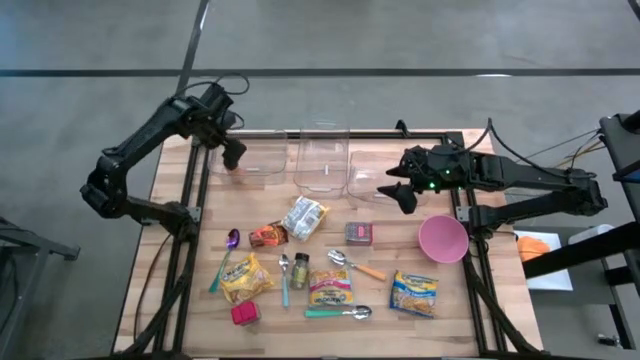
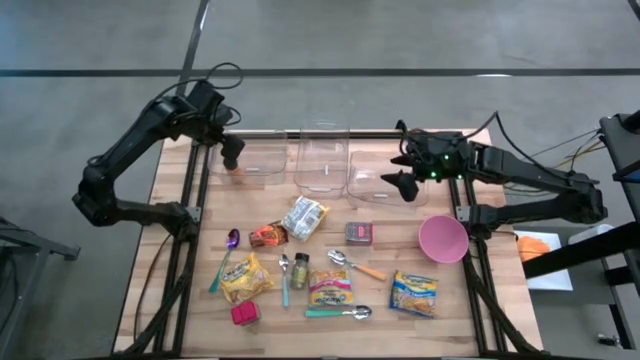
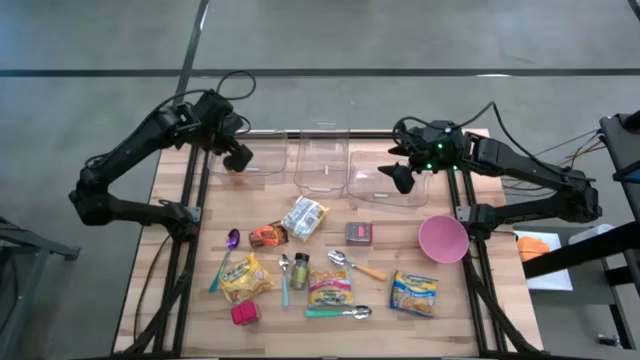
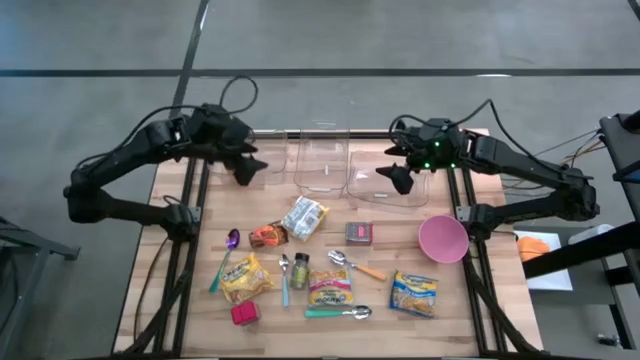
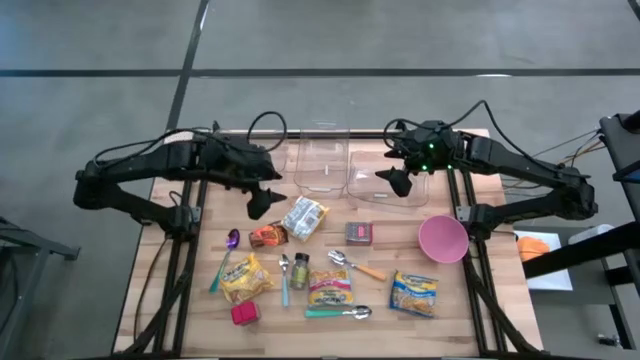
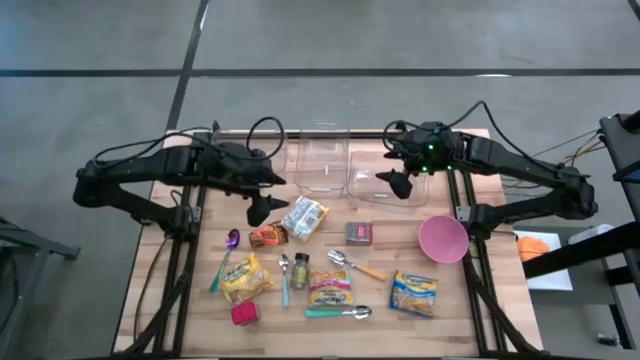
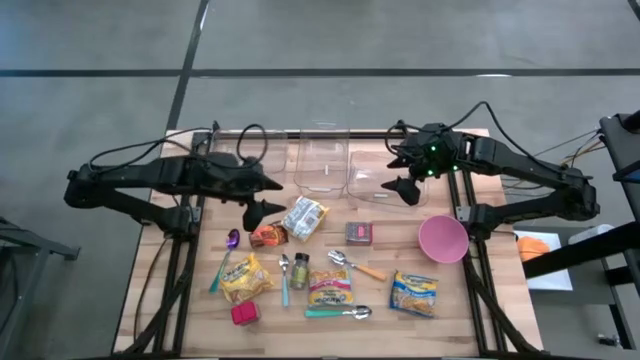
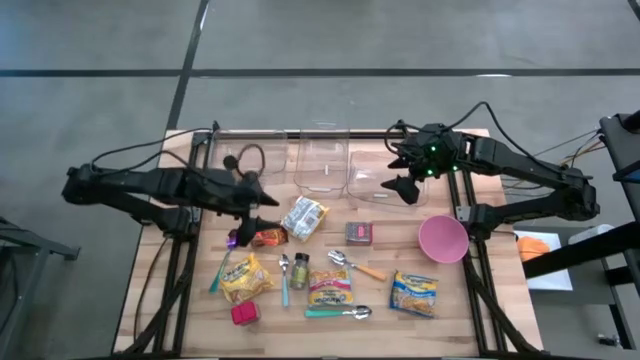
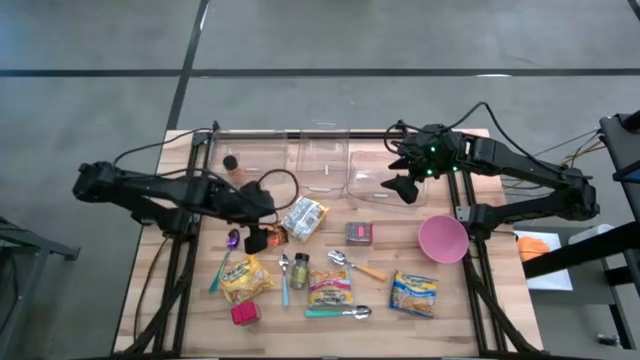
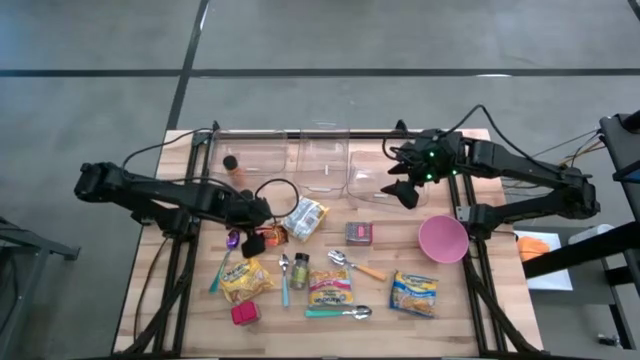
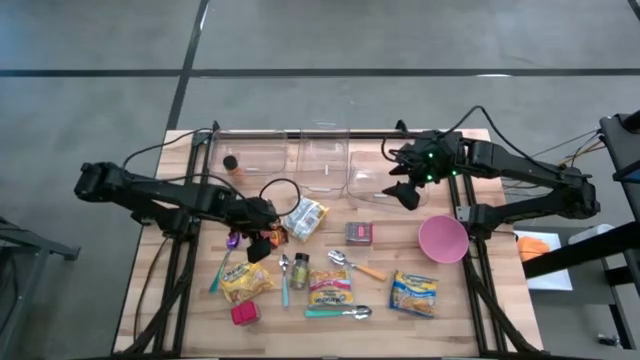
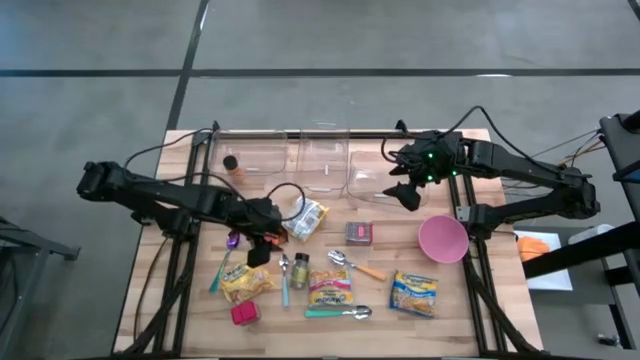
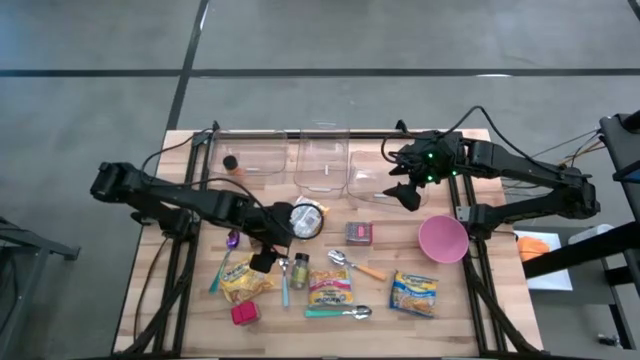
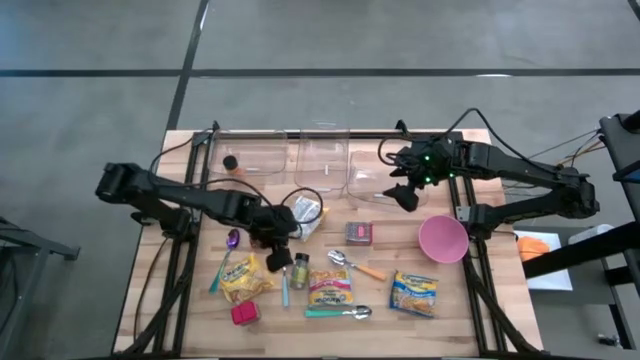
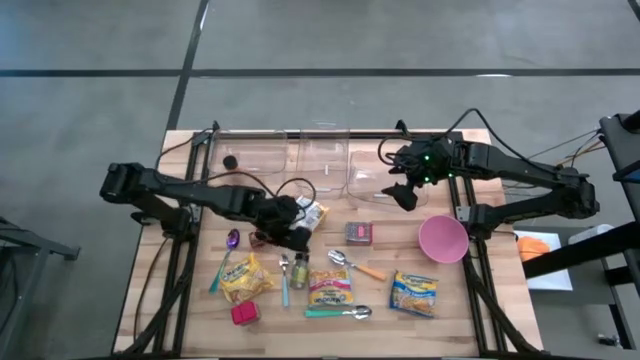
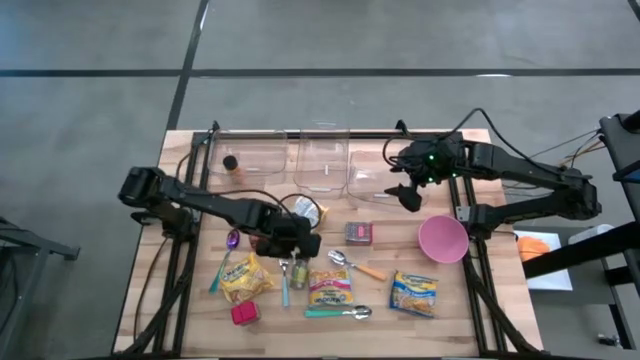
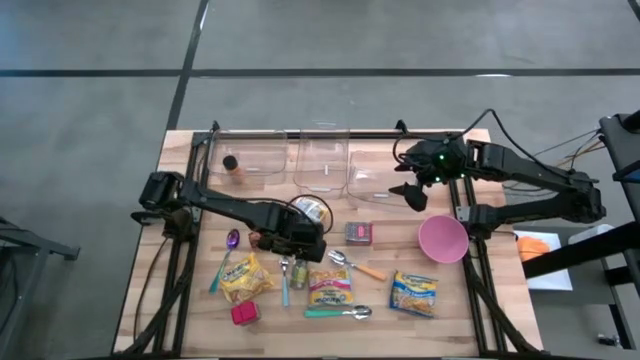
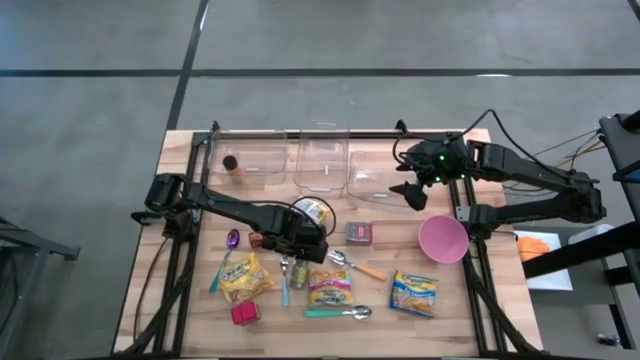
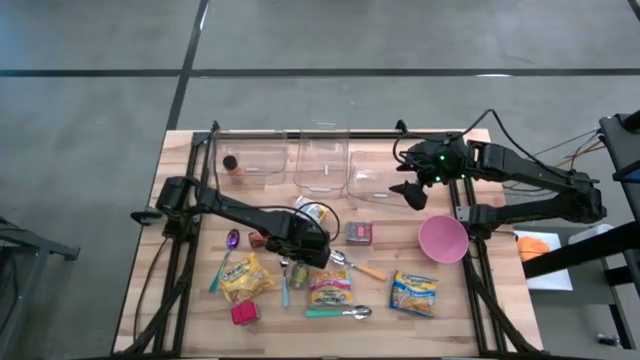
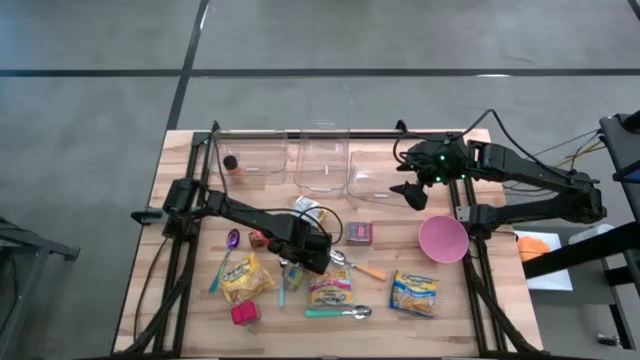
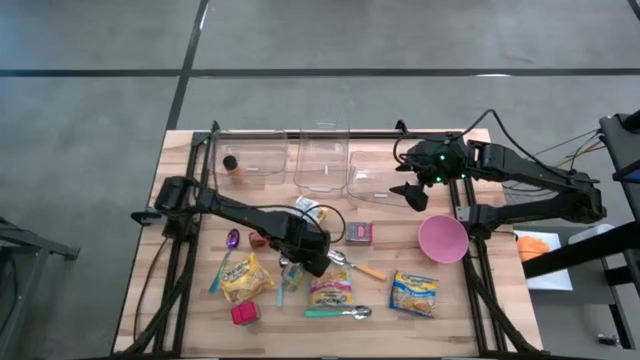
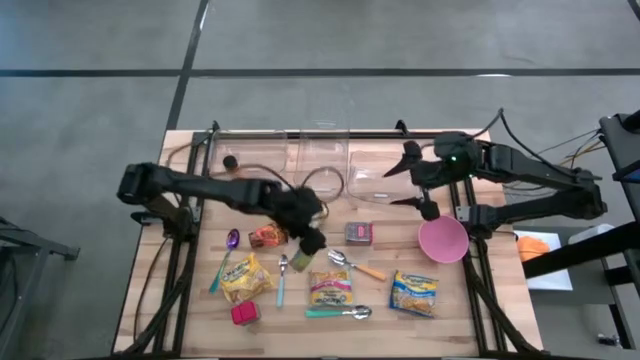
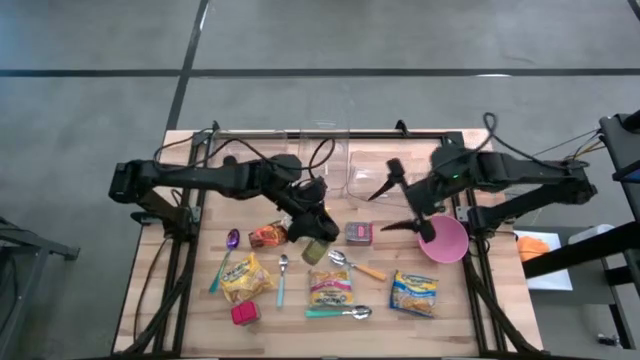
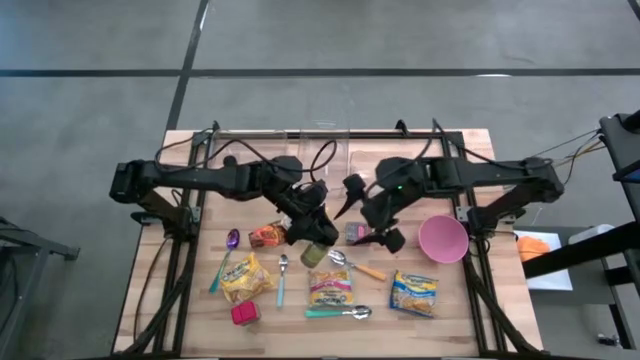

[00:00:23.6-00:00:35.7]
Put the black seasoning bottle into the left transparent bin

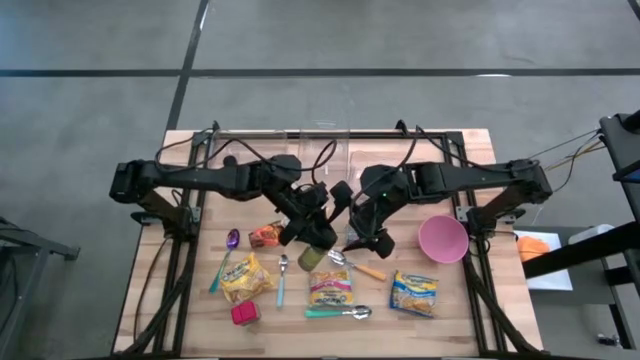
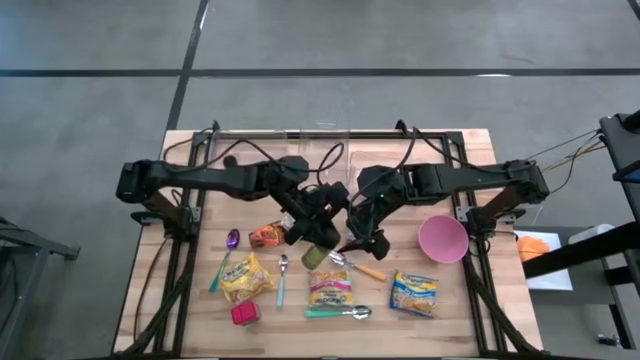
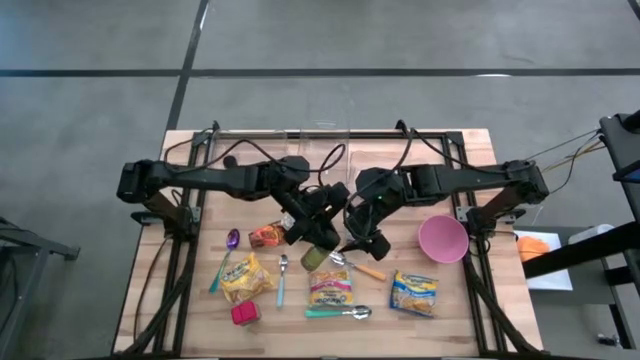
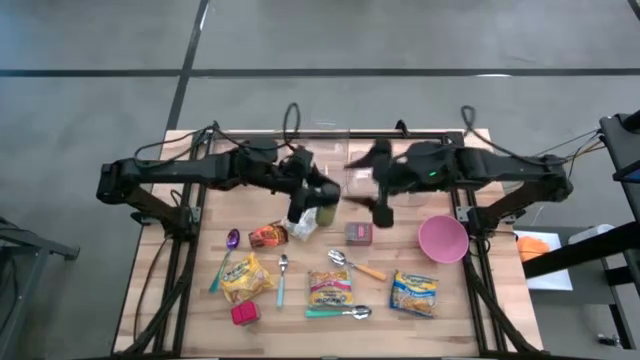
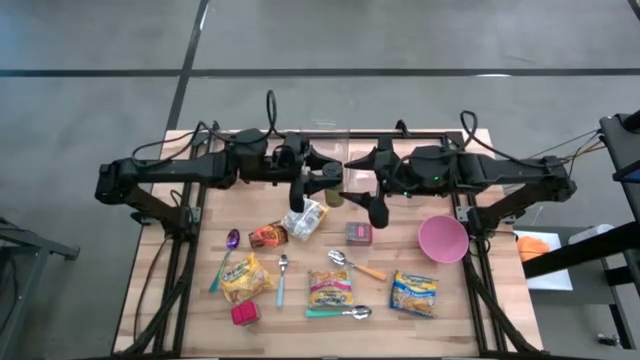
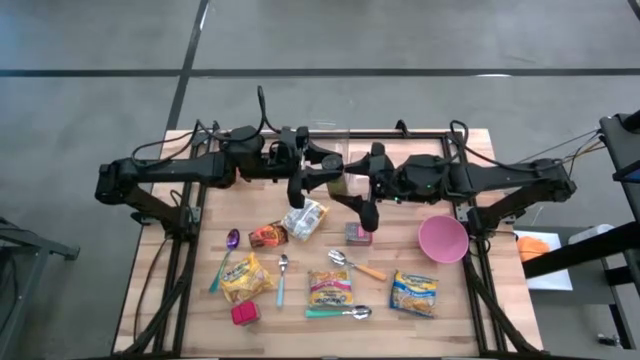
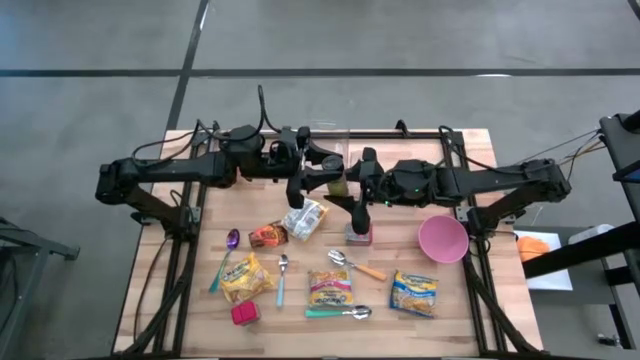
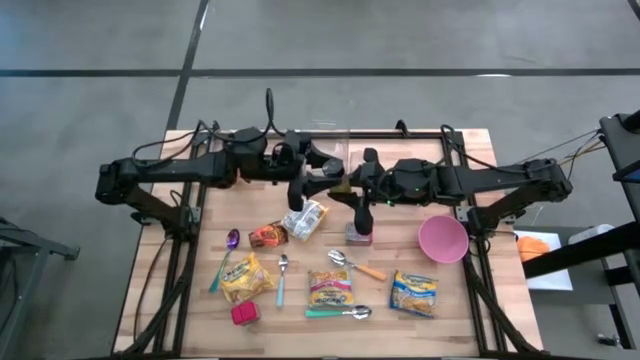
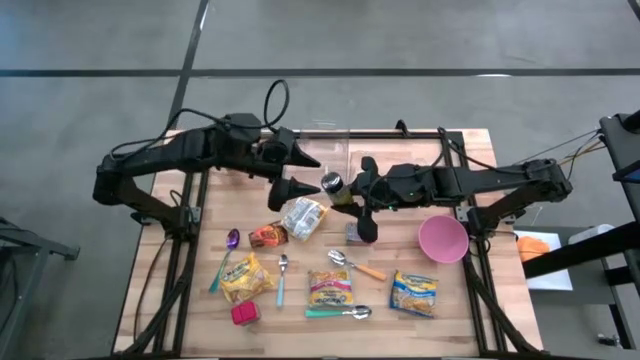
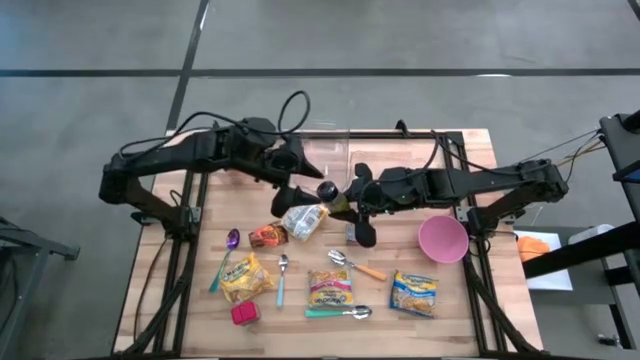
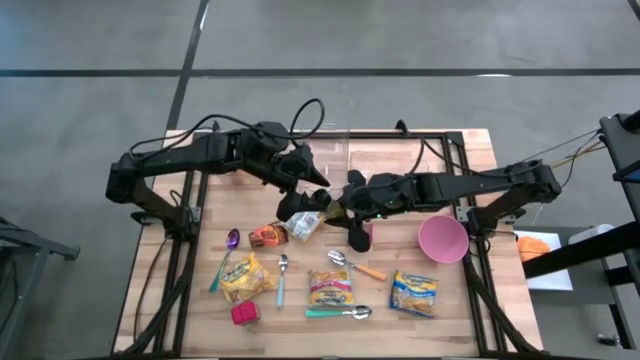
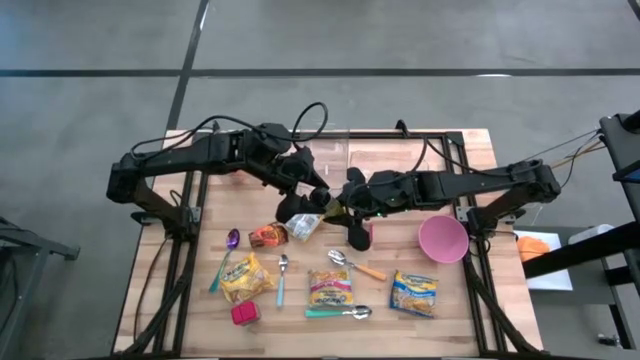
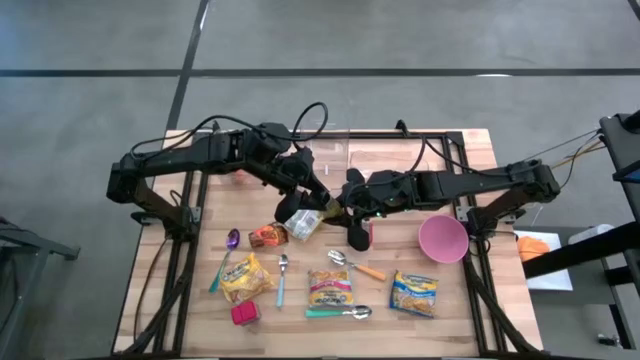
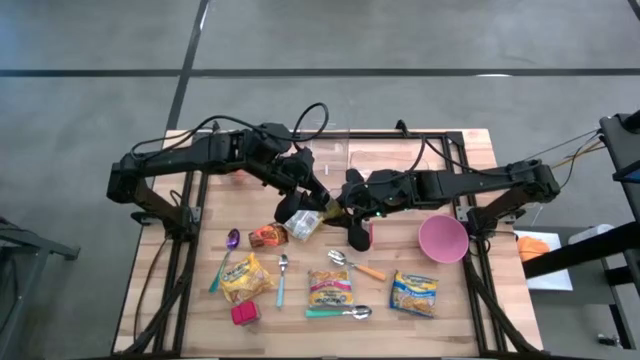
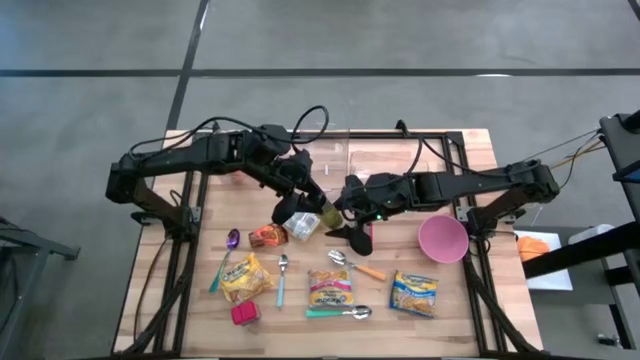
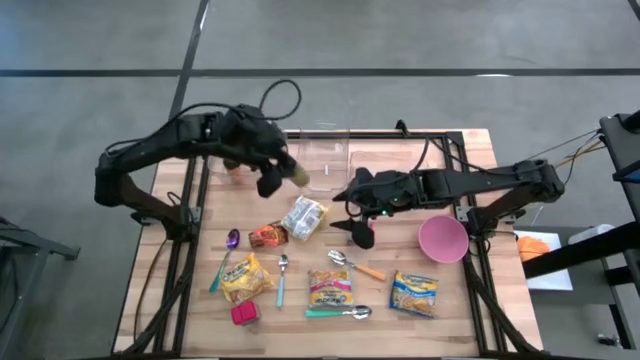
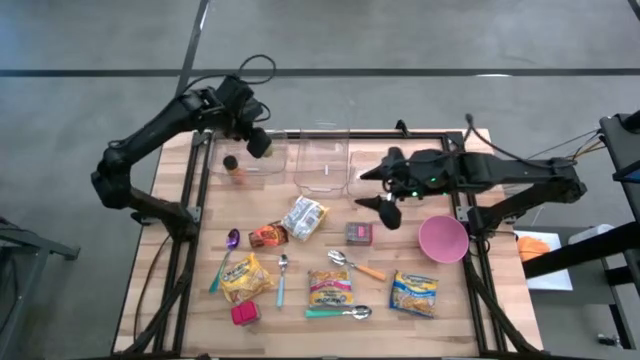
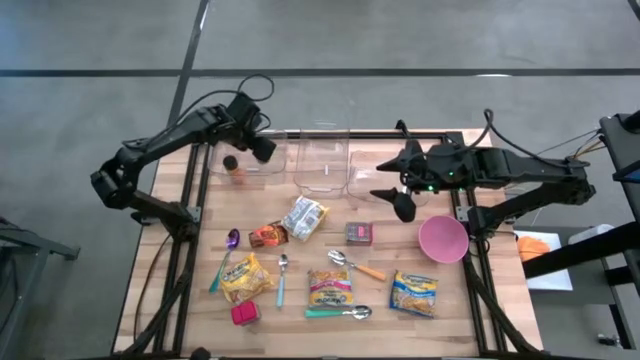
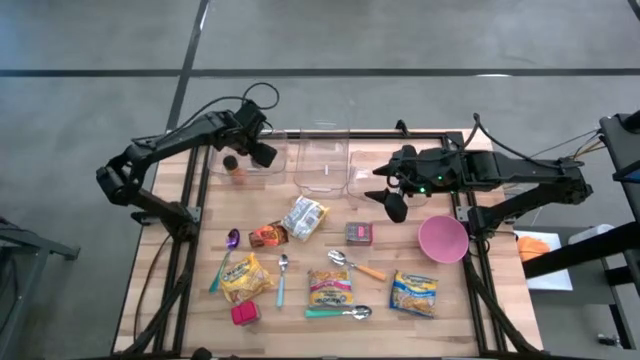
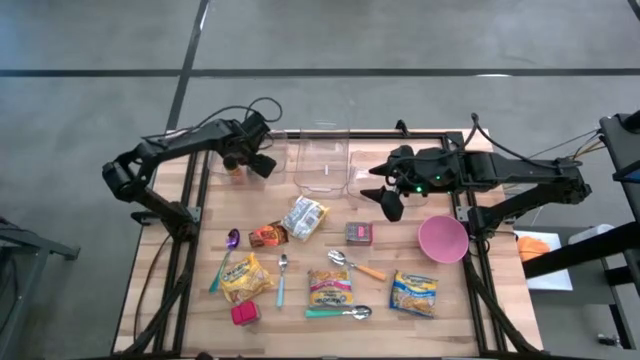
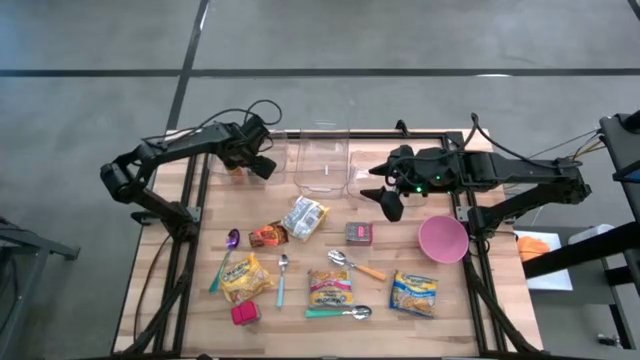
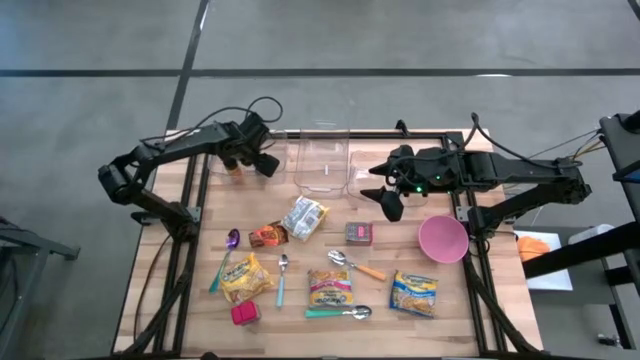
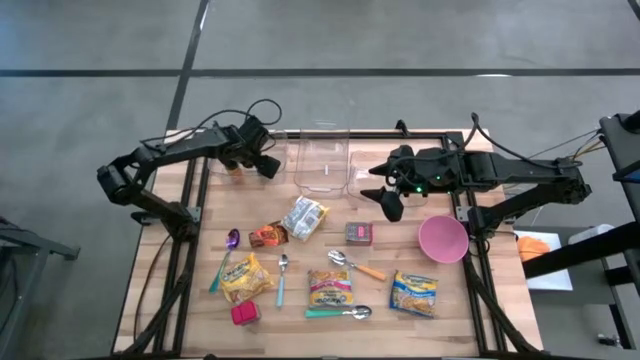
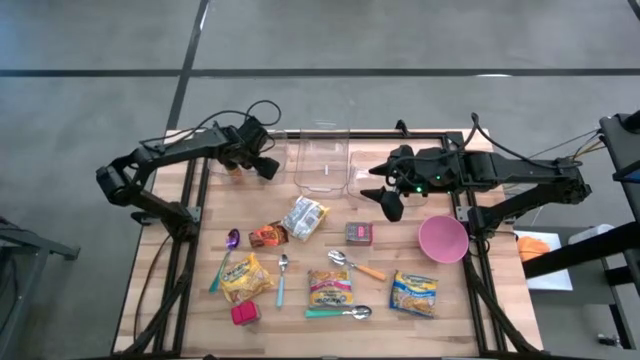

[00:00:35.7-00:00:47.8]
Put the black seasoning bottle into the left transparent bin
